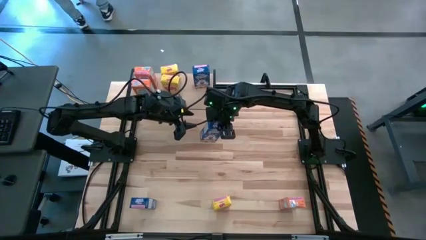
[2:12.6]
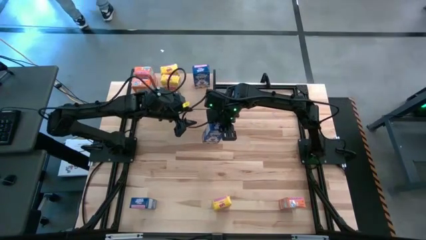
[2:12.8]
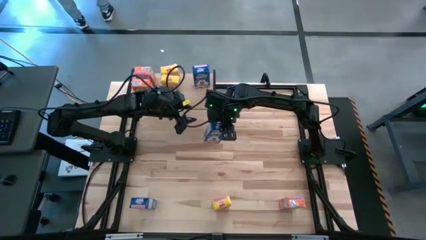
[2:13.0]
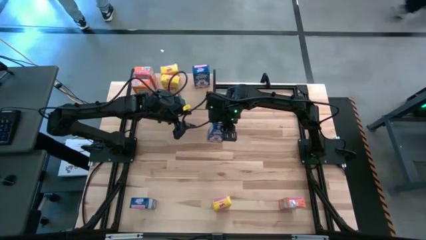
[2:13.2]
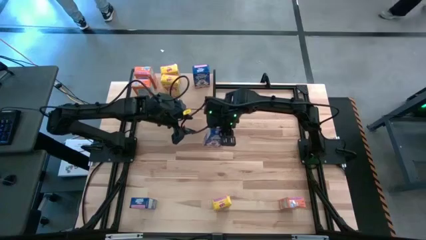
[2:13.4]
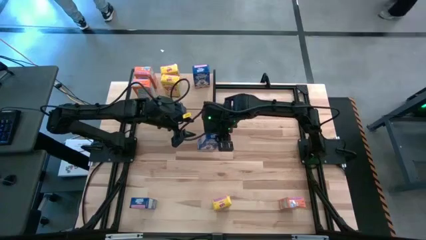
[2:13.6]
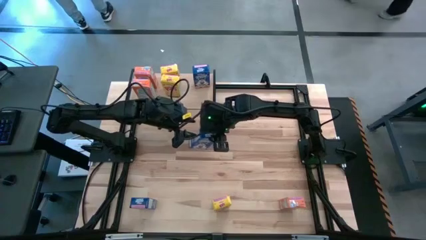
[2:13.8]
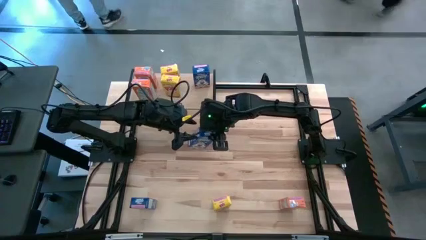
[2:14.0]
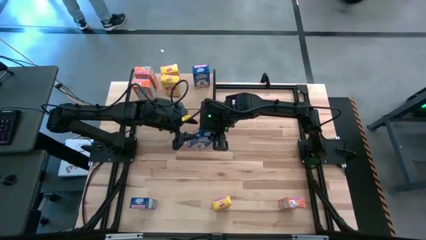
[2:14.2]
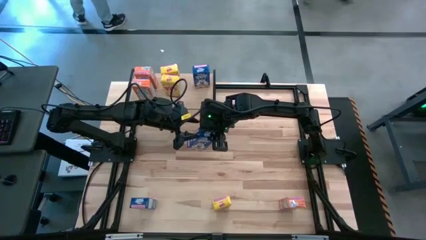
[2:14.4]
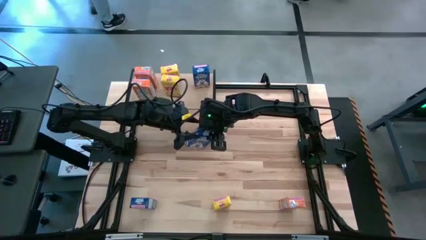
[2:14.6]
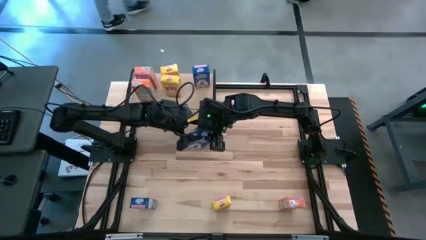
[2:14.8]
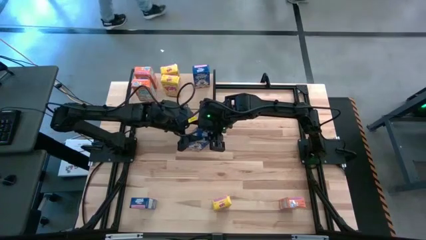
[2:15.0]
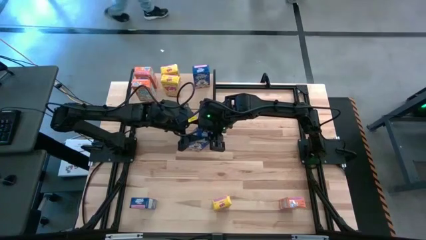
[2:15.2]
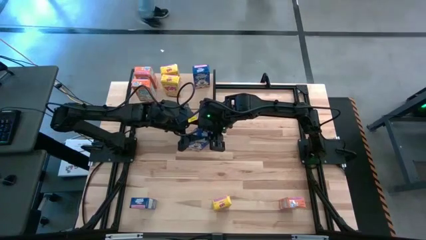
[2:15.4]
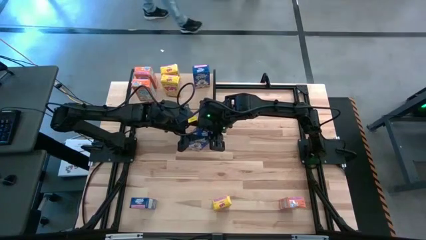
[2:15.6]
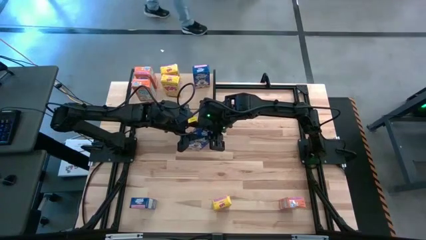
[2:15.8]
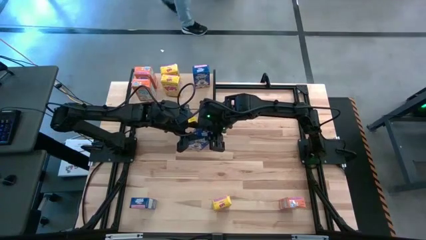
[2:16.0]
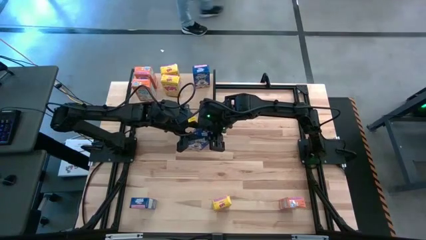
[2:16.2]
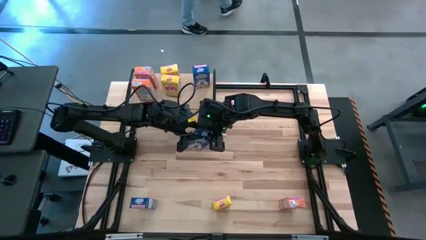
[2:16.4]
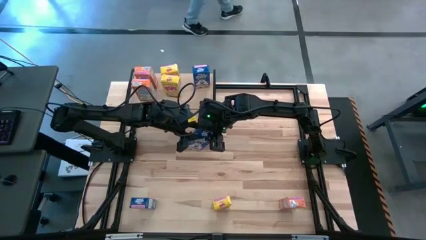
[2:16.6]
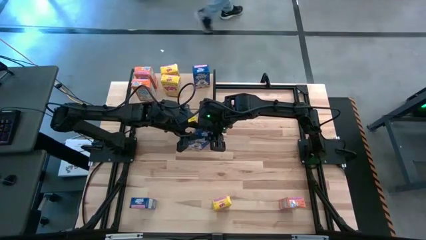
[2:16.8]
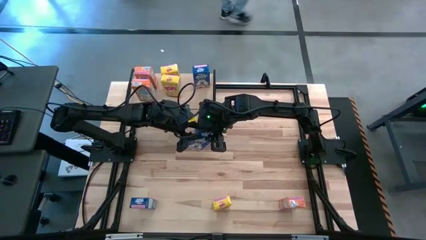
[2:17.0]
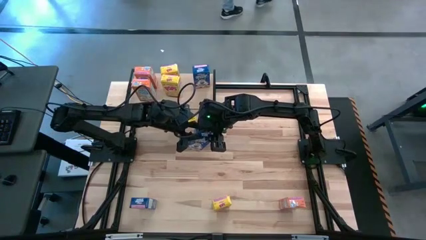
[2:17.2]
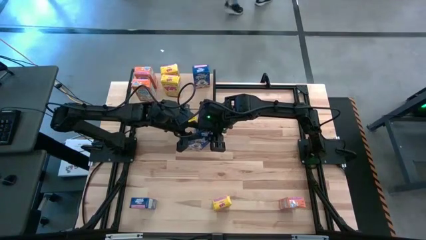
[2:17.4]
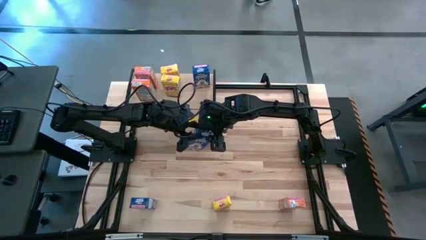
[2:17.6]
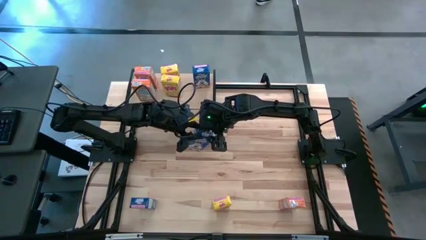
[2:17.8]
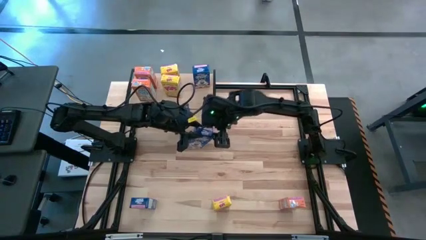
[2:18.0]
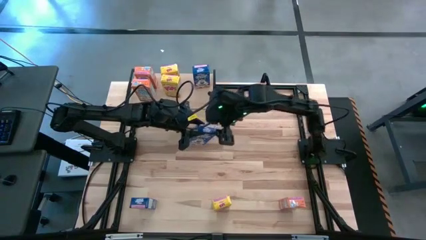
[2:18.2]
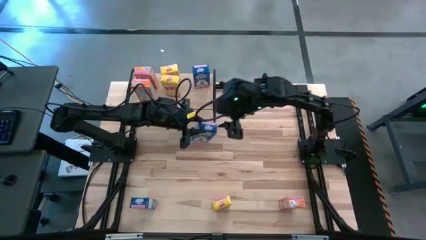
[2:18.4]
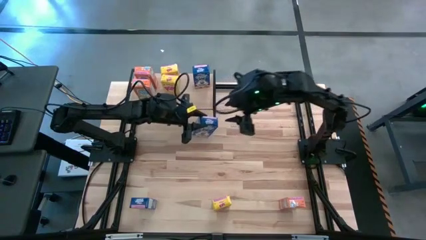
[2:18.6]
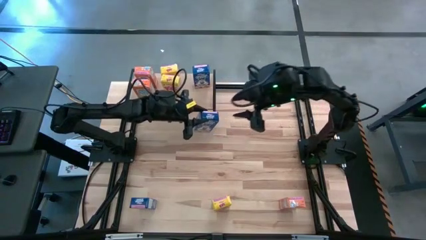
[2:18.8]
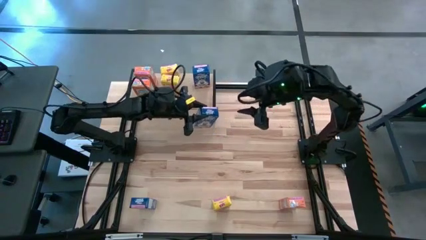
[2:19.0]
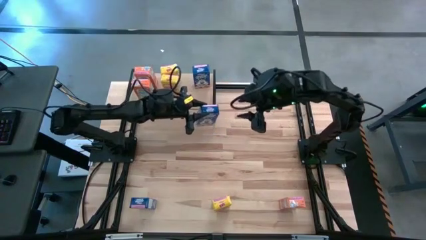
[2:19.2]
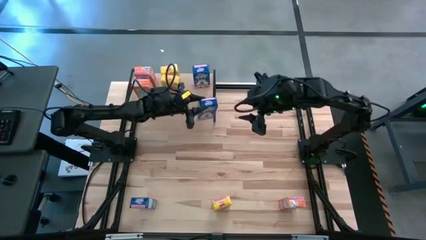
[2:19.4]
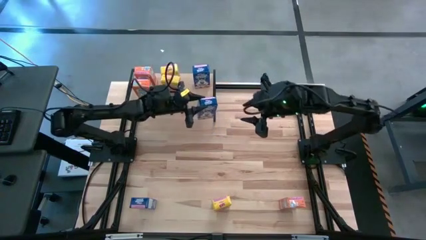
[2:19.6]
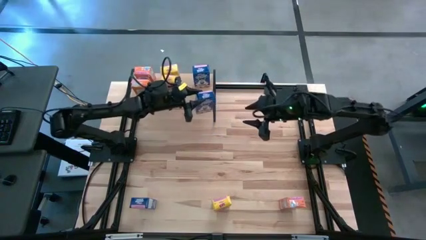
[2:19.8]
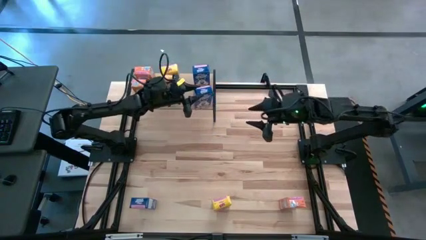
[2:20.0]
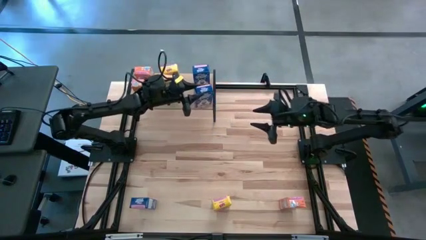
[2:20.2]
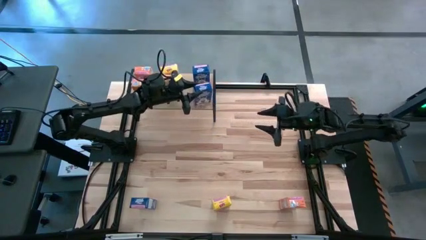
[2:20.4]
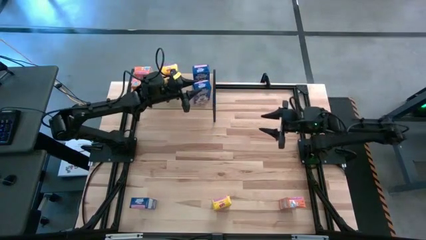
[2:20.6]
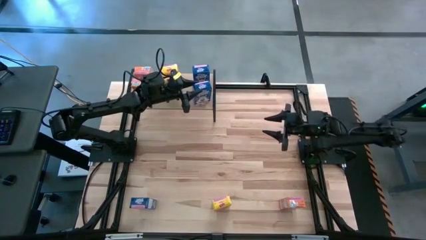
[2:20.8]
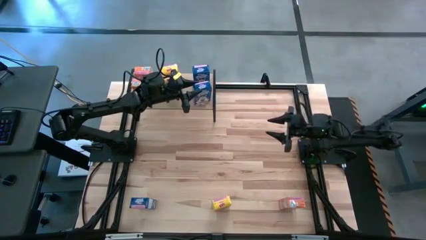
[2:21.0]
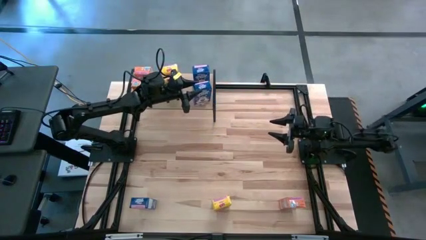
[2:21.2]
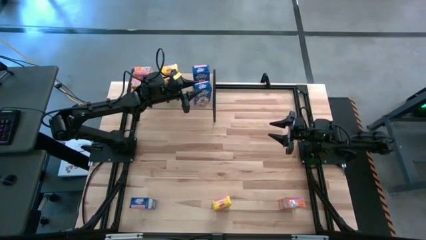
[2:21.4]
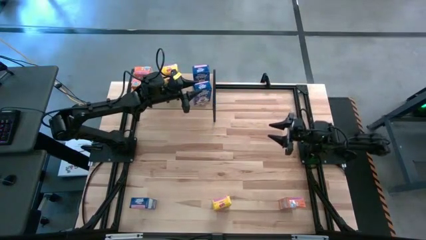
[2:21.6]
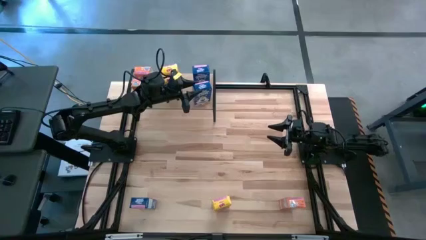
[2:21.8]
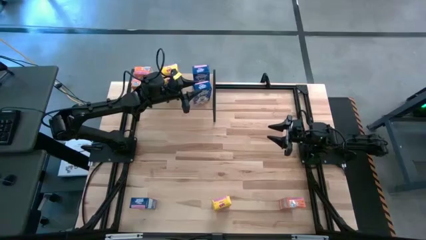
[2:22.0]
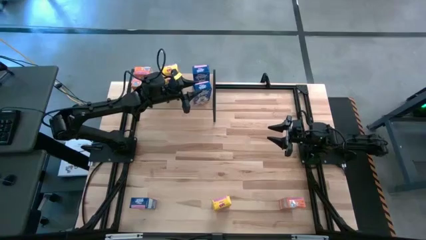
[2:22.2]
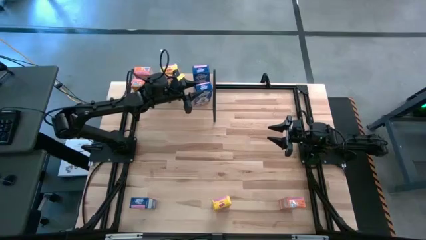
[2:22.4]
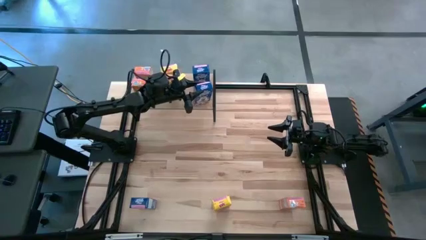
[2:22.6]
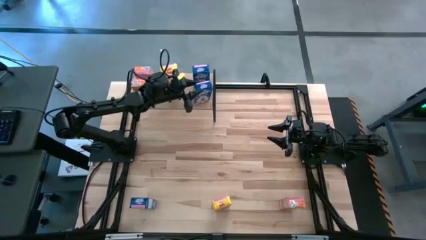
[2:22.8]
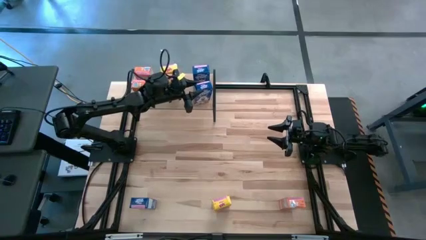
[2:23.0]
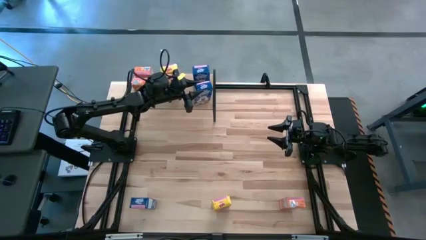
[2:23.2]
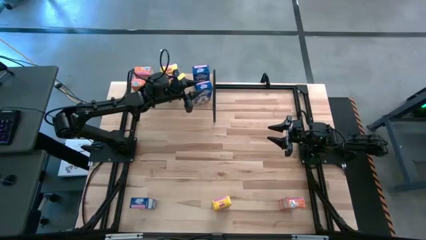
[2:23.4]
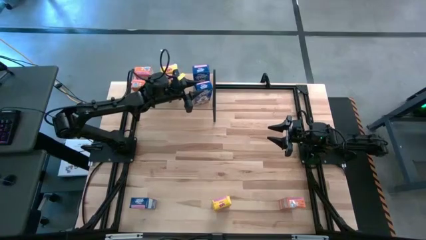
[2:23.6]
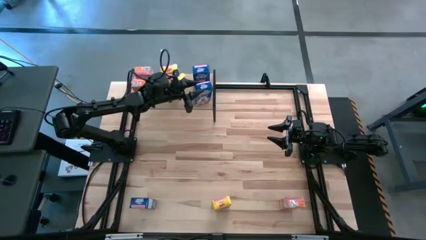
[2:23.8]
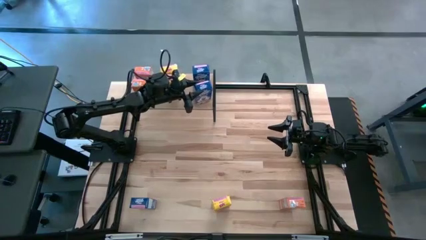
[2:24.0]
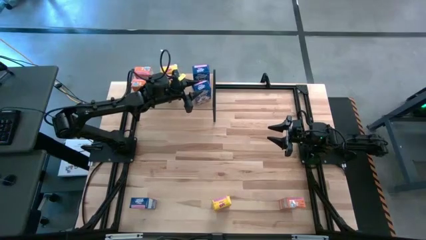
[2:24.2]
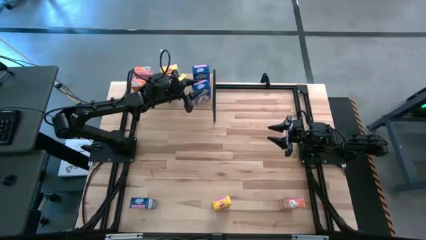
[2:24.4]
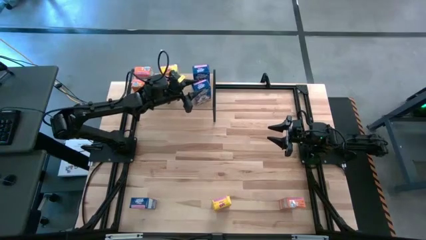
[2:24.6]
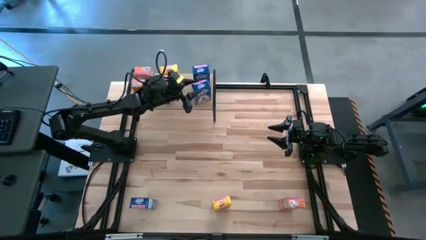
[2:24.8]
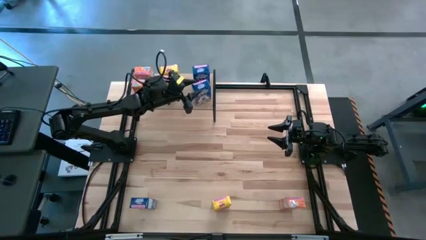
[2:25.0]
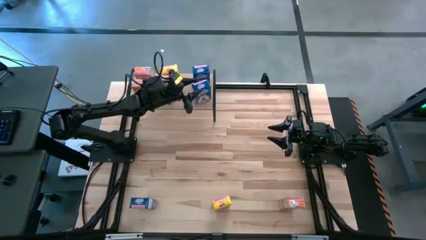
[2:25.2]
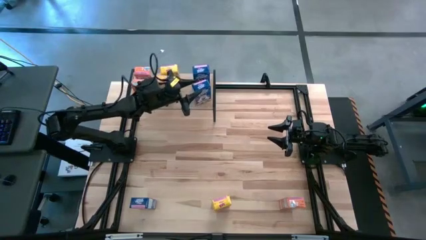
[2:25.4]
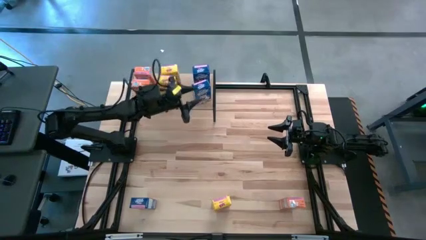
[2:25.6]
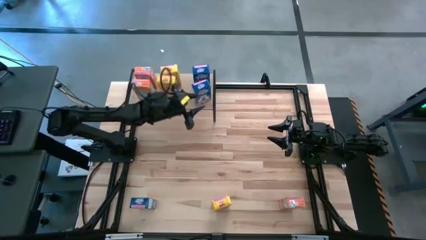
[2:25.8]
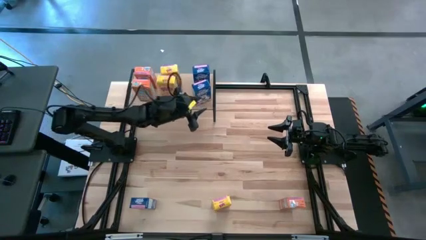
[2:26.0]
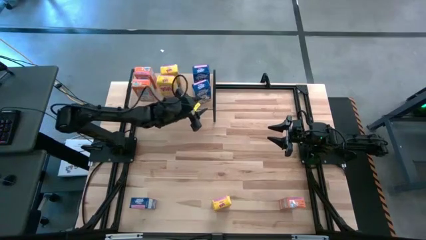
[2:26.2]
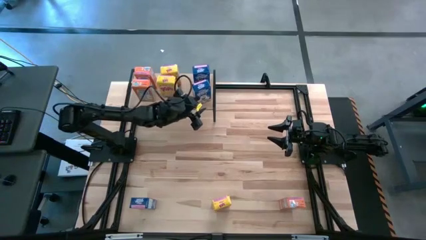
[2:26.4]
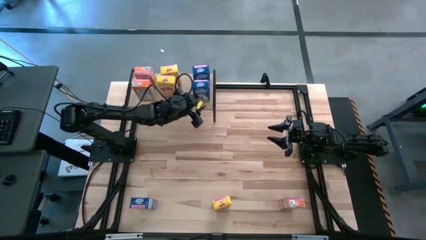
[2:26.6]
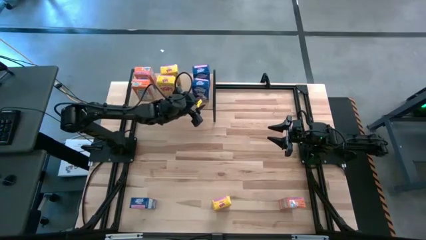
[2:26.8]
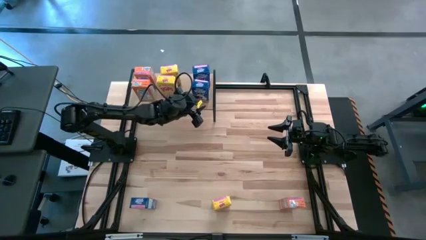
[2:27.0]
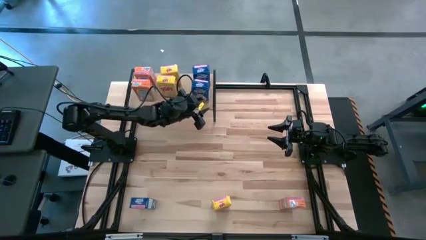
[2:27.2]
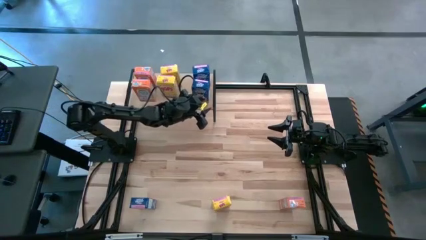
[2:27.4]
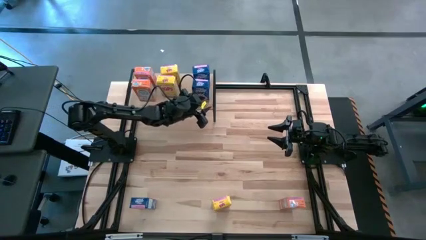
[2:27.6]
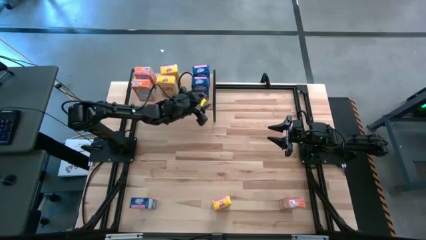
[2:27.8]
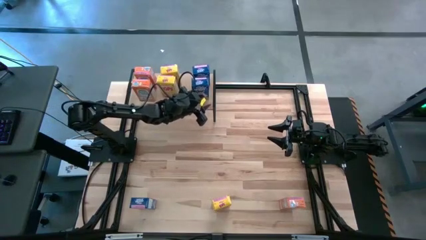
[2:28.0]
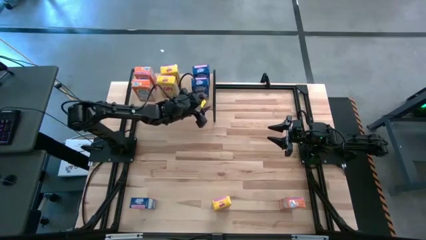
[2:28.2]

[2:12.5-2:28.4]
Task: Stack cereal on shelf
Put the top blue cereal box on the shelf aligned with the other blue cereal box
